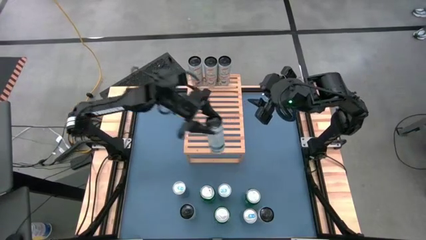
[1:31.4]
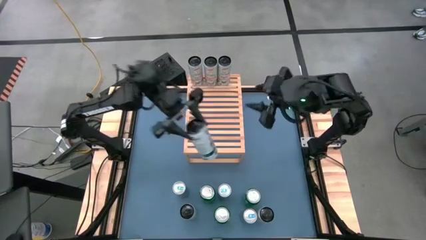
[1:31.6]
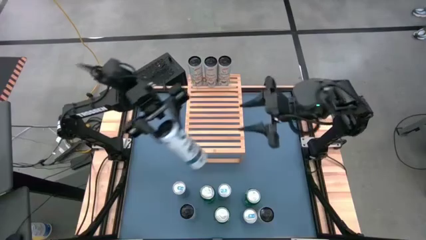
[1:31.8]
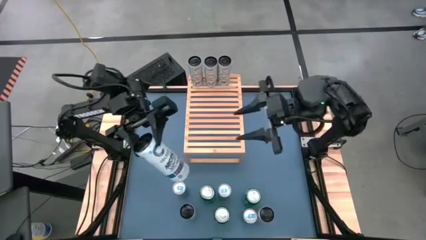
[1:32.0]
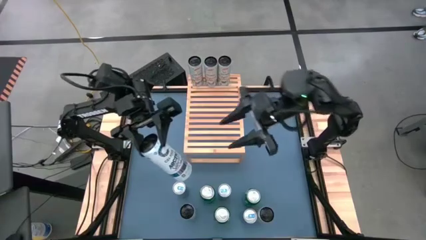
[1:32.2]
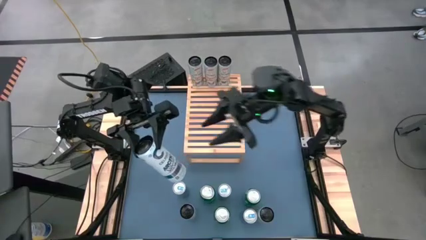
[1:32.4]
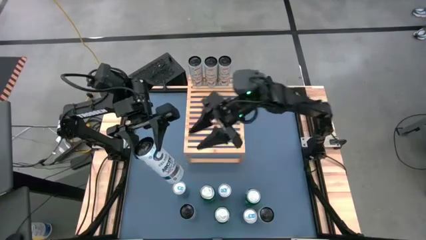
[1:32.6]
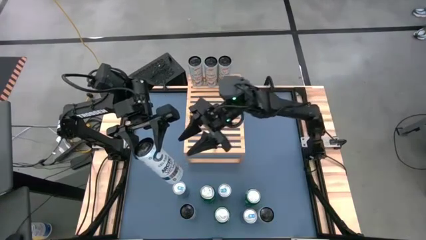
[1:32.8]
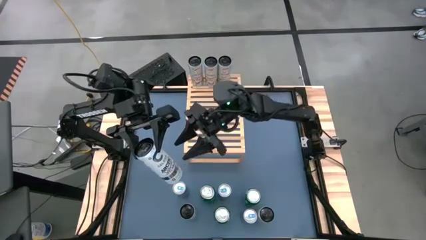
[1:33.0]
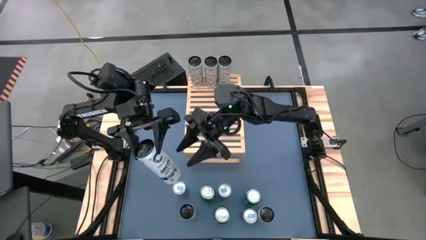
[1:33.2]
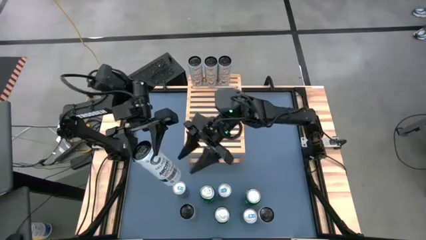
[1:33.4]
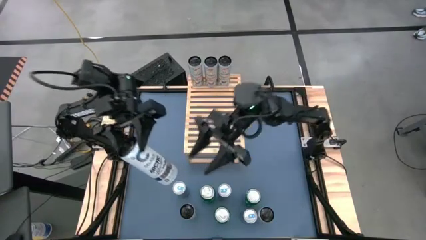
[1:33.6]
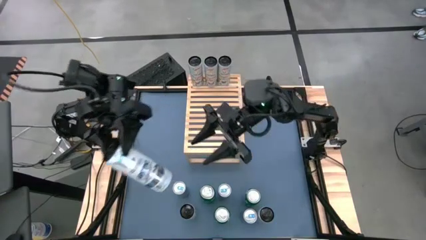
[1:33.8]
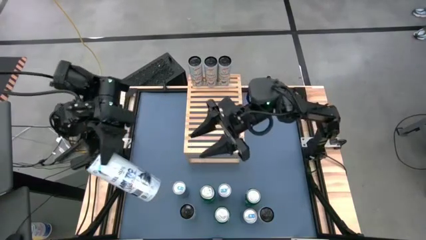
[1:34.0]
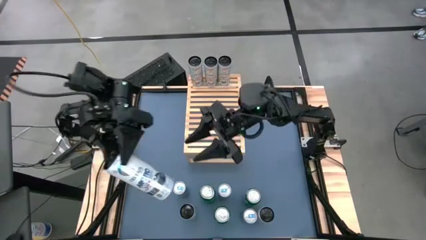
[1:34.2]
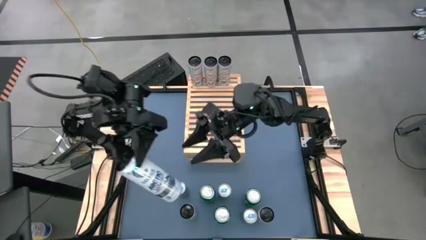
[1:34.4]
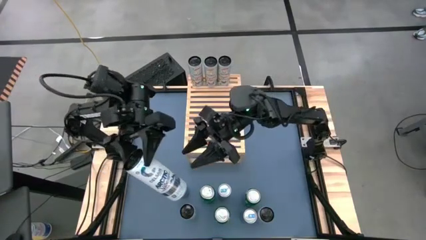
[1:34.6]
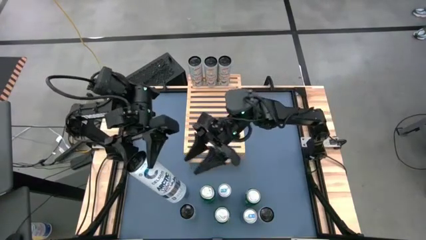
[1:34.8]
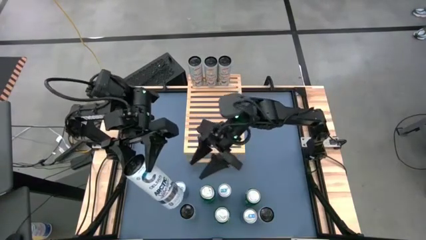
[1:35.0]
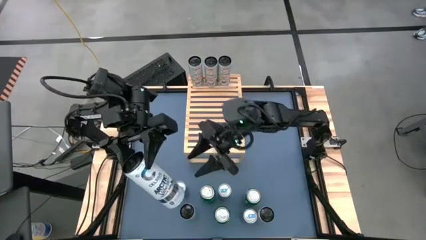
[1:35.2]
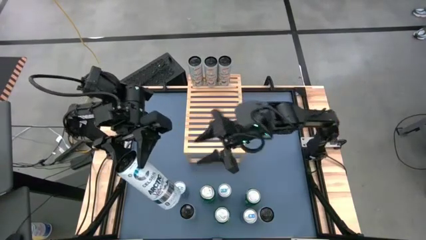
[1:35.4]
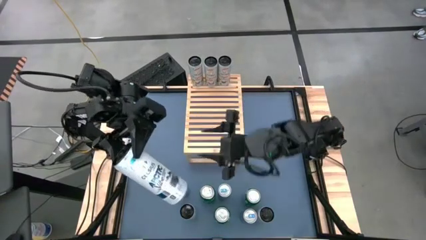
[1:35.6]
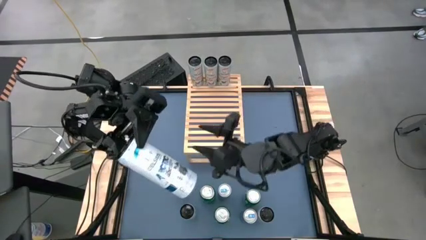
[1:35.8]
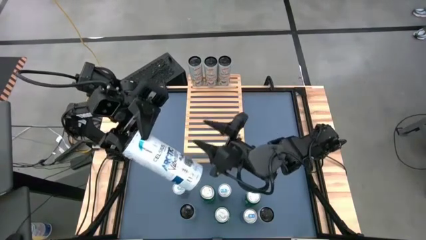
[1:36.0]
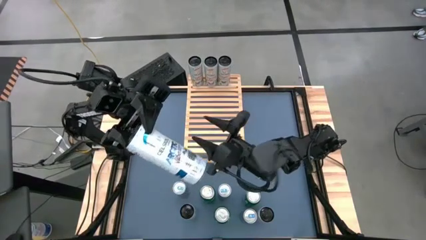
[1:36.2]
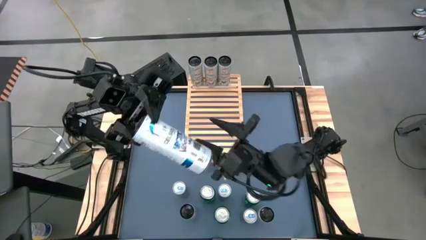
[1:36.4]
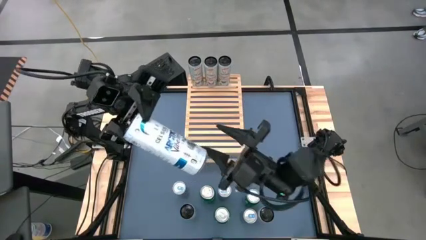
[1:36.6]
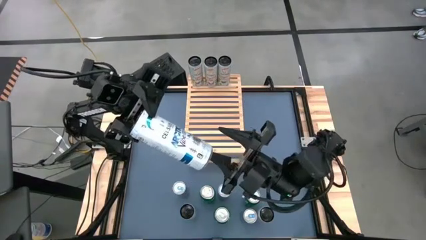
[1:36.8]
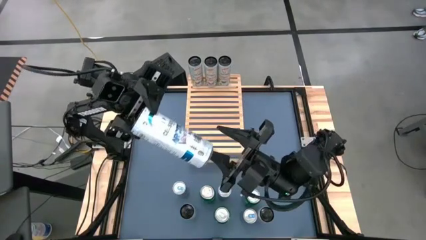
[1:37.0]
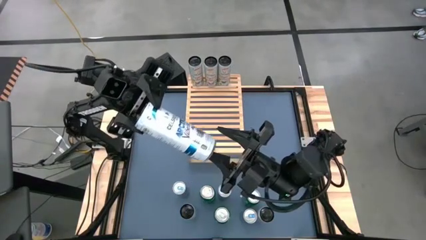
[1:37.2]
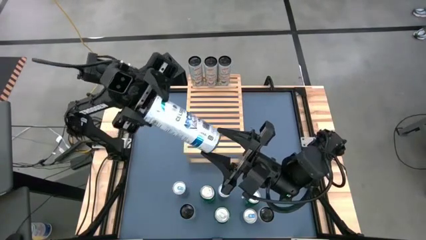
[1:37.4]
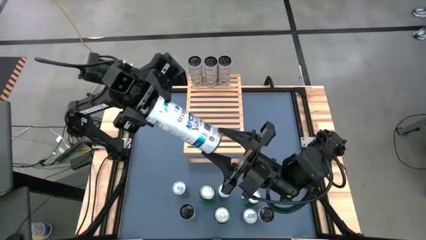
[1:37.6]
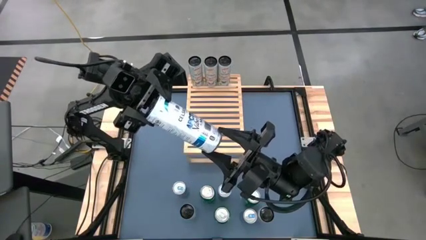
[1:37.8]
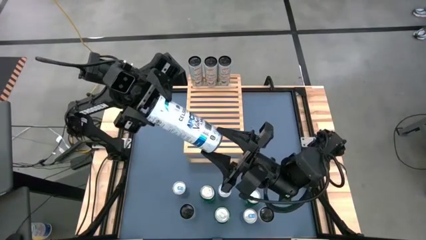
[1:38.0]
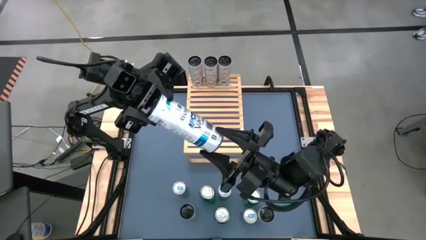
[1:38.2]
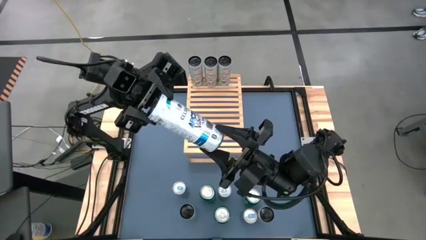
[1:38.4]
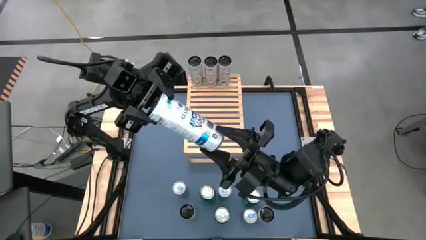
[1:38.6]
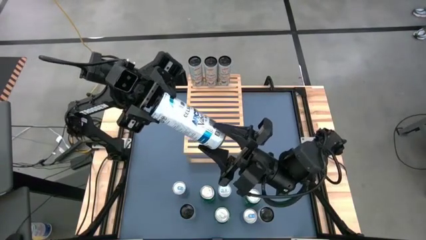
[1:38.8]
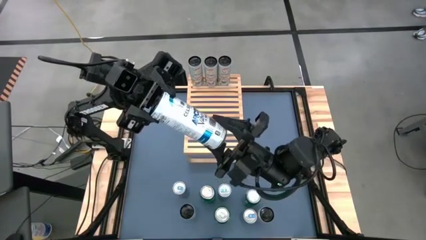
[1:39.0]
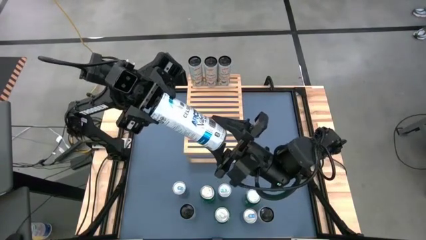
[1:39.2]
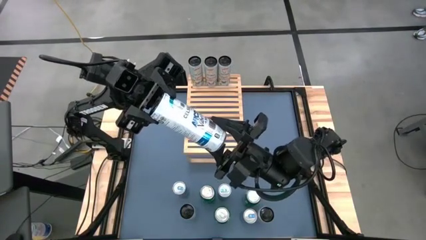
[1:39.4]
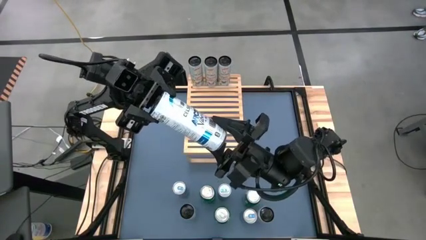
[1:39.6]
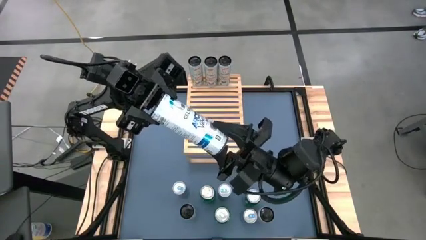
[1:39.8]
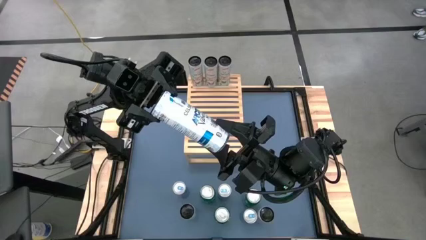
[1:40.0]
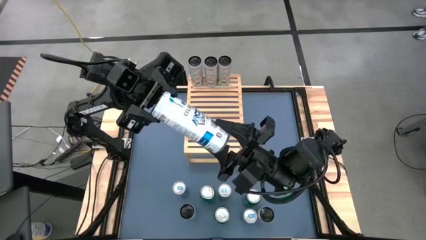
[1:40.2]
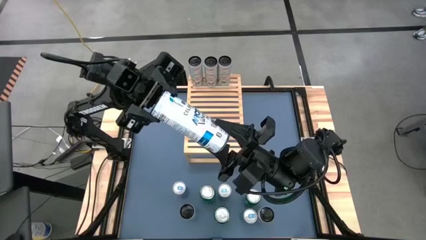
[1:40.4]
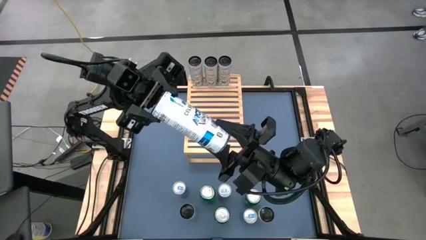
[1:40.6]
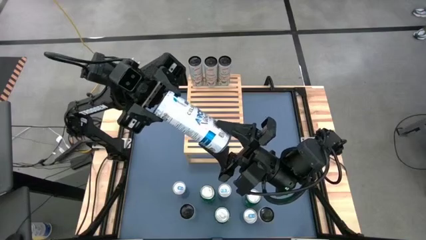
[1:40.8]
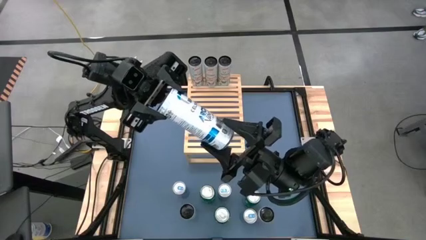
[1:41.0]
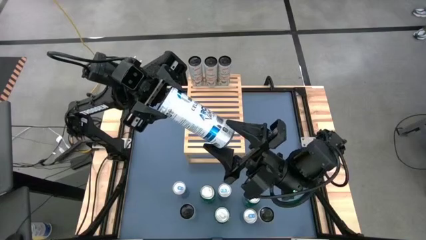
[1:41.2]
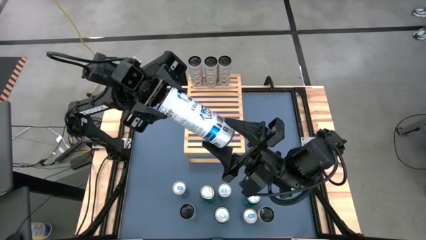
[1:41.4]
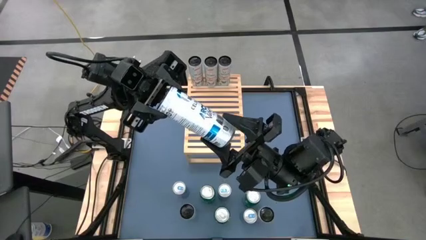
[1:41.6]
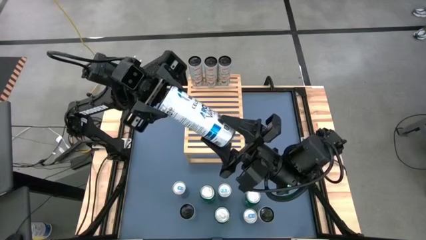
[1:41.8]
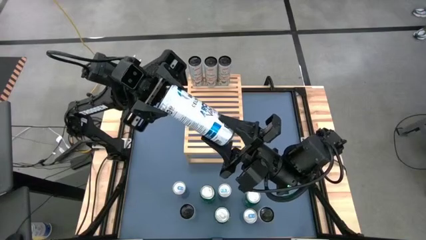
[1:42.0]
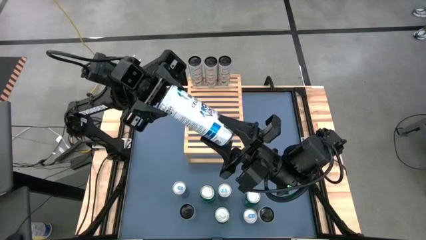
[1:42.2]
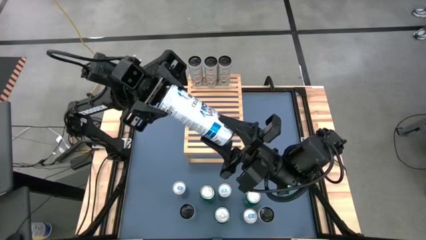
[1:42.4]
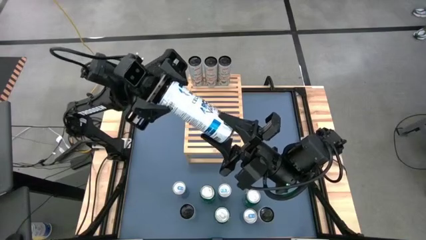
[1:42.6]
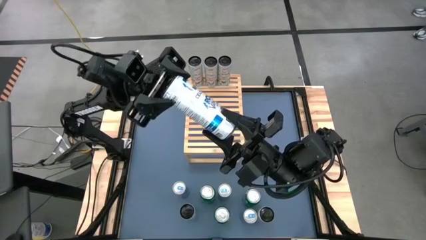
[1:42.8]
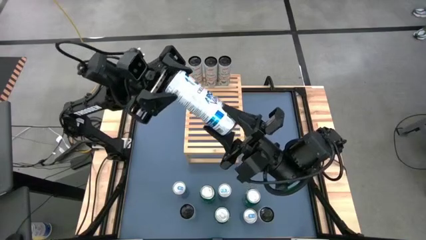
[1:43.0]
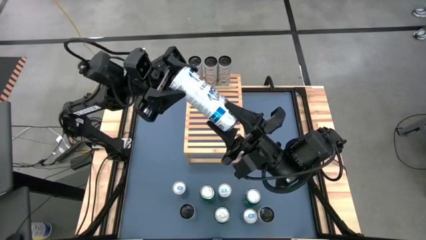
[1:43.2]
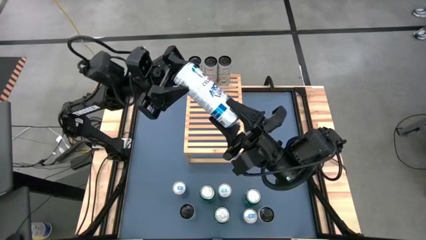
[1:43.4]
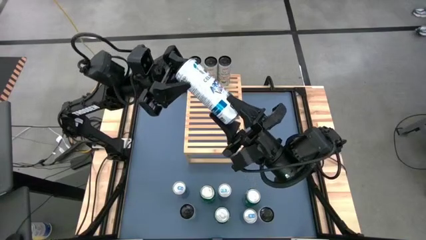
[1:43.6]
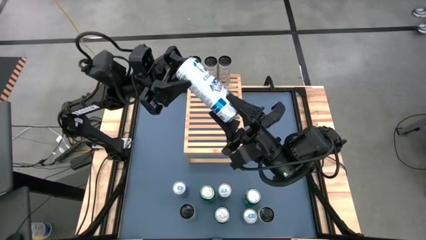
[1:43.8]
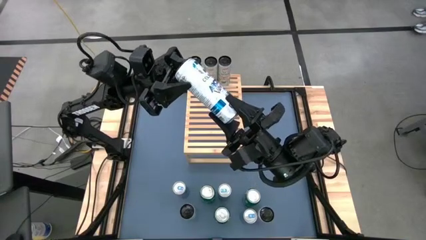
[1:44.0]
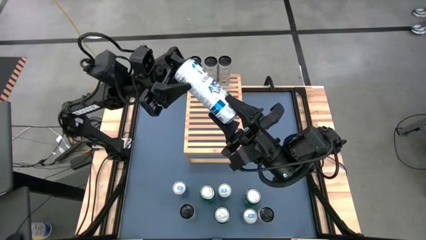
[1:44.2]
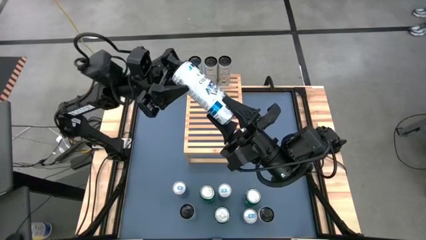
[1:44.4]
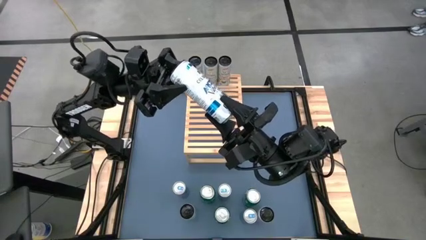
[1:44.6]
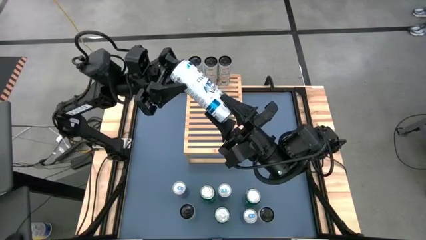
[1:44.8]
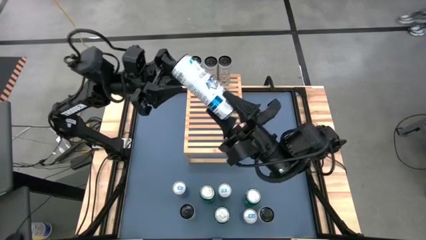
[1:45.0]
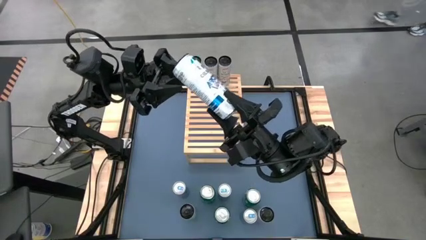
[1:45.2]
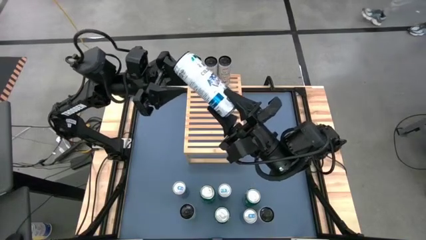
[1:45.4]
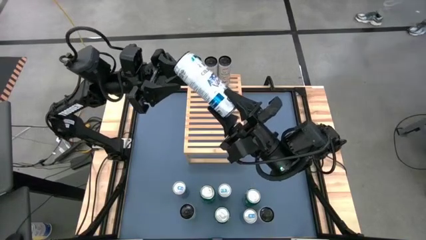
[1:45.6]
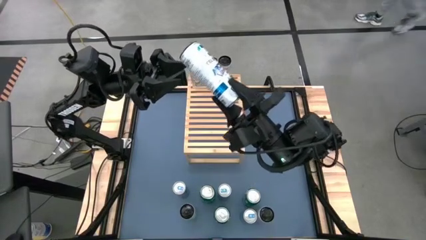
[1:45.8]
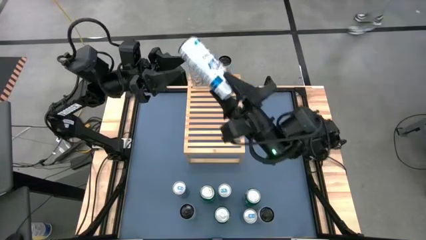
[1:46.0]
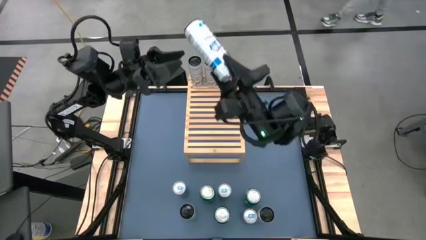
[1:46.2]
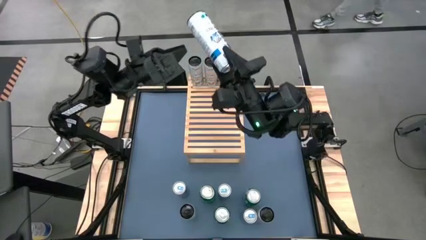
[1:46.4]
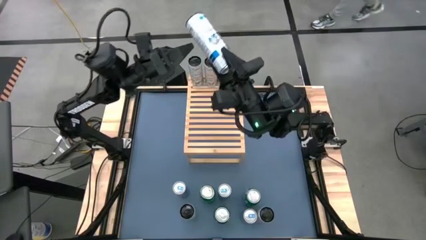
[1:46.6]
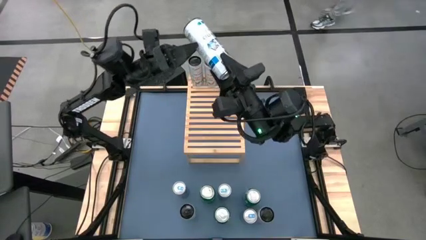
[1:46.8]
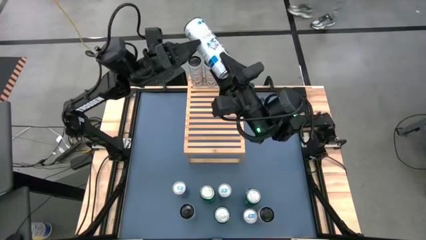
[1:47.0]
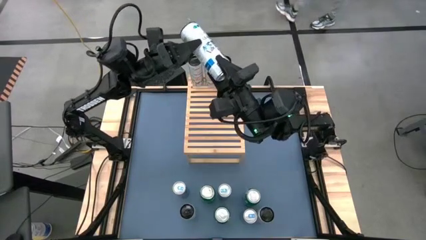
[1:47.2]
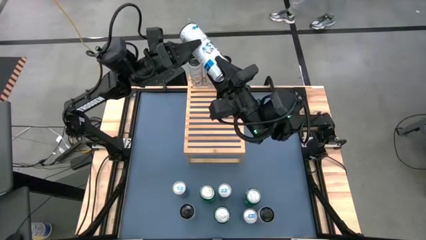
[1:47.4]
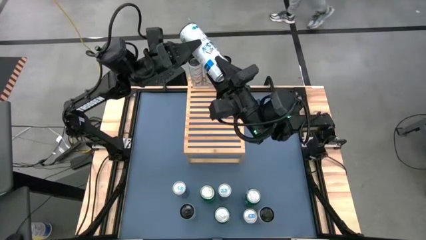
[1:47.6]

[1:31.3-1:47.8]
Task: Place canned beverage on shelf
Put the white blue soda can on the shelf
